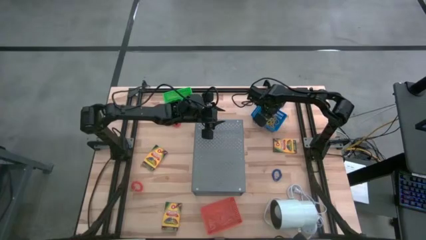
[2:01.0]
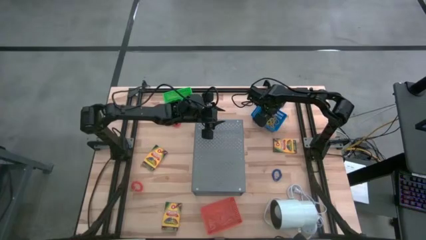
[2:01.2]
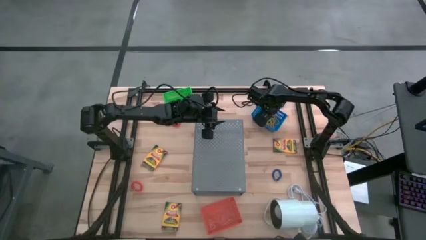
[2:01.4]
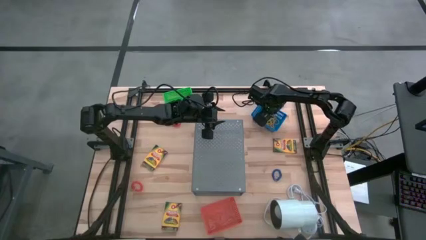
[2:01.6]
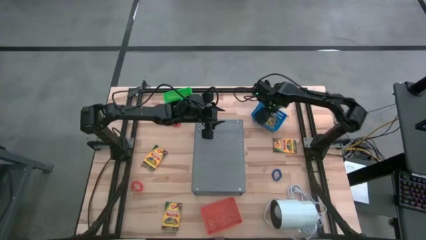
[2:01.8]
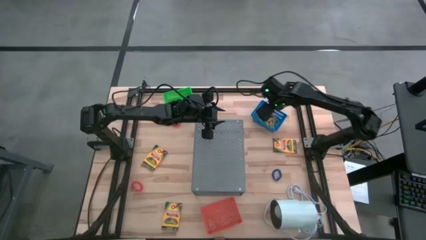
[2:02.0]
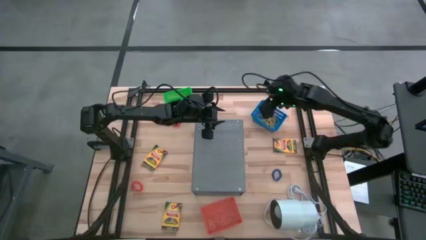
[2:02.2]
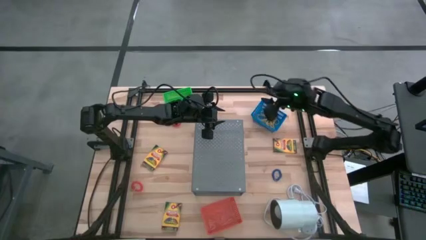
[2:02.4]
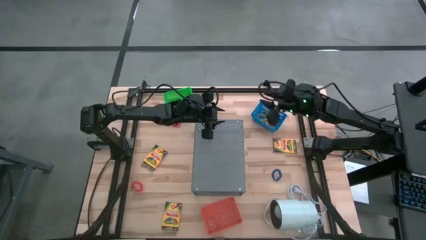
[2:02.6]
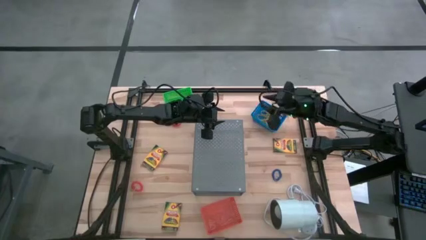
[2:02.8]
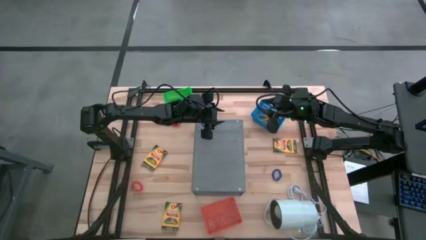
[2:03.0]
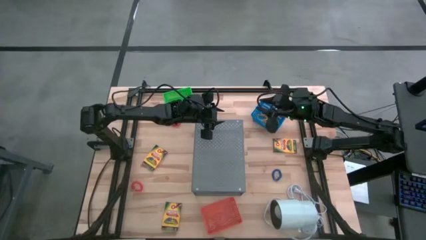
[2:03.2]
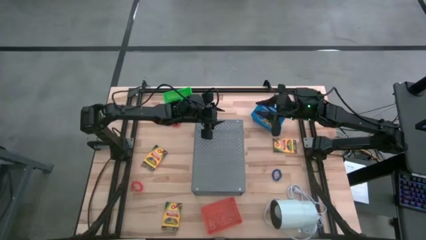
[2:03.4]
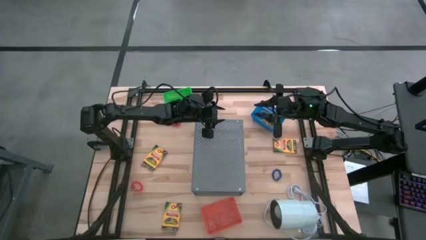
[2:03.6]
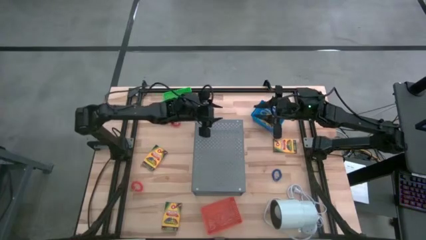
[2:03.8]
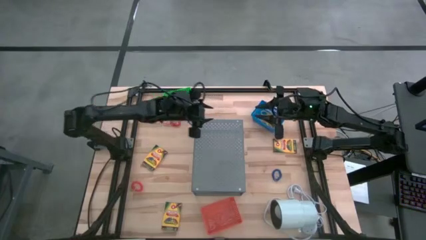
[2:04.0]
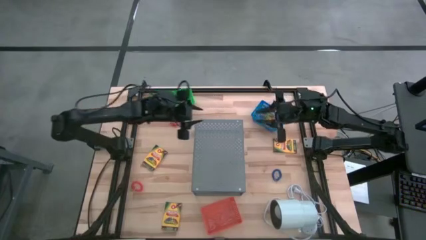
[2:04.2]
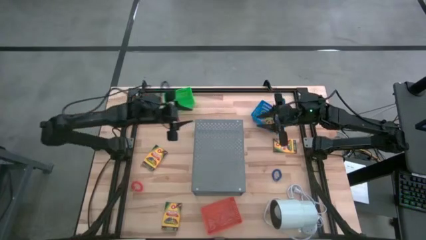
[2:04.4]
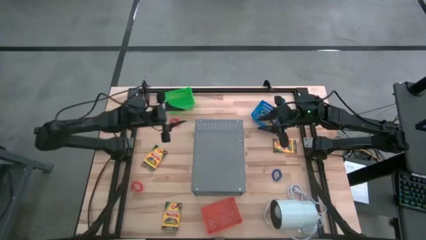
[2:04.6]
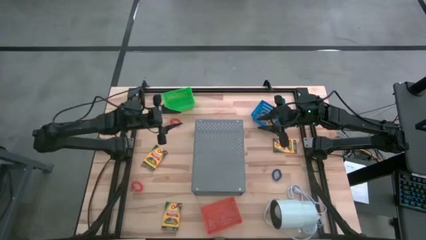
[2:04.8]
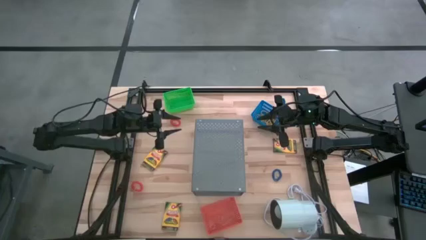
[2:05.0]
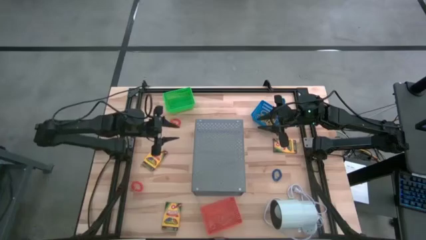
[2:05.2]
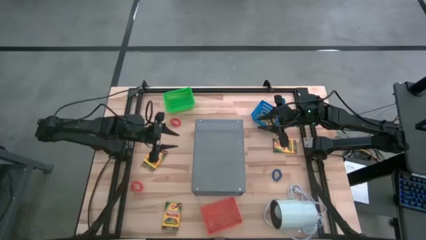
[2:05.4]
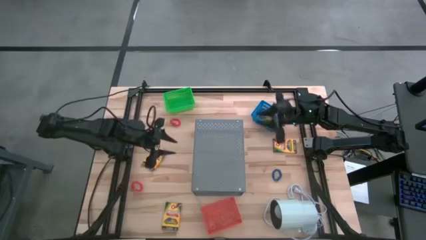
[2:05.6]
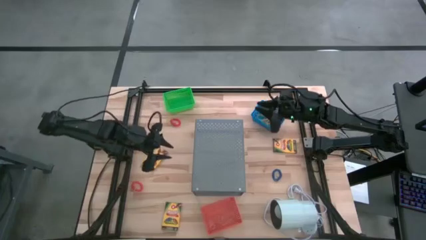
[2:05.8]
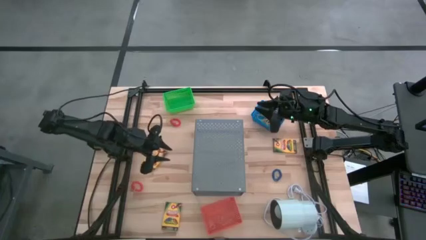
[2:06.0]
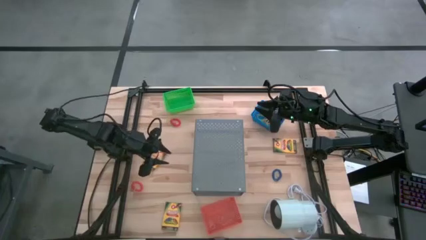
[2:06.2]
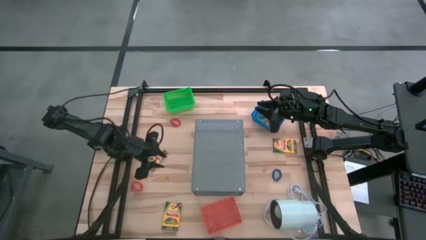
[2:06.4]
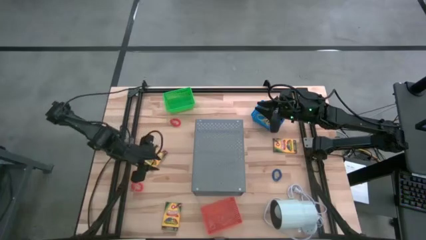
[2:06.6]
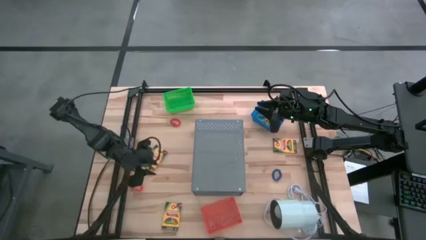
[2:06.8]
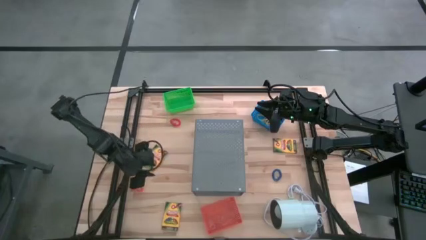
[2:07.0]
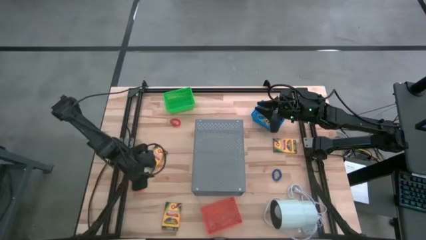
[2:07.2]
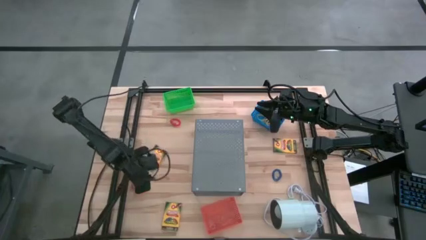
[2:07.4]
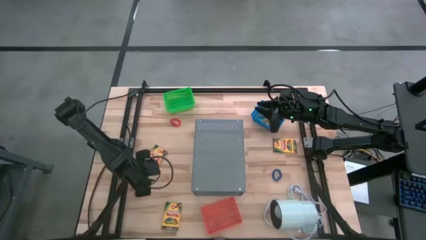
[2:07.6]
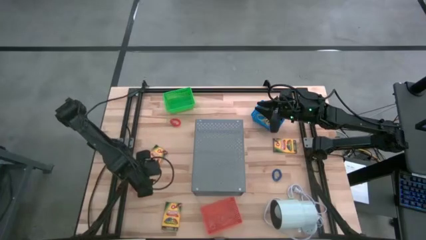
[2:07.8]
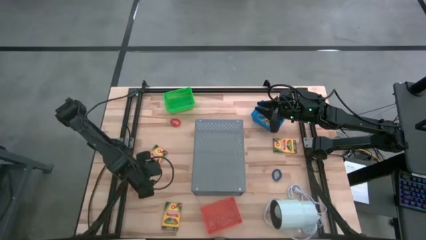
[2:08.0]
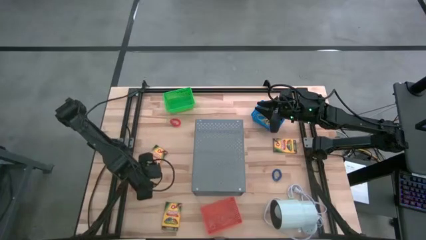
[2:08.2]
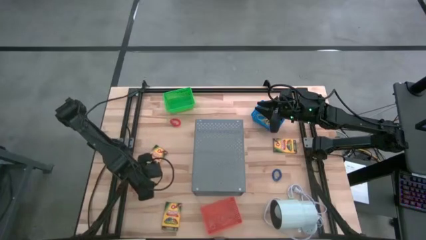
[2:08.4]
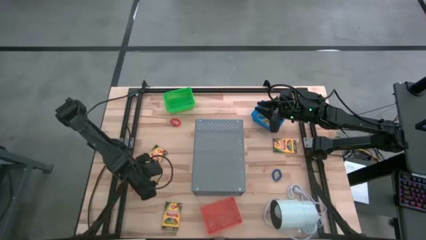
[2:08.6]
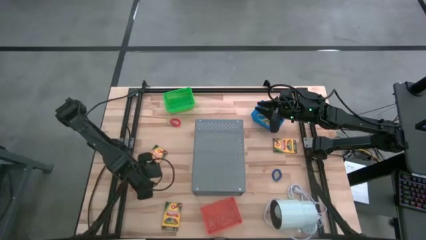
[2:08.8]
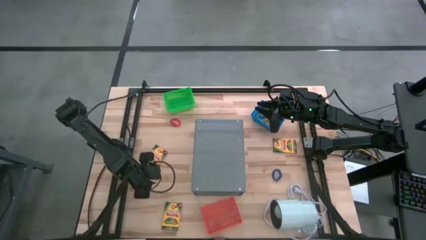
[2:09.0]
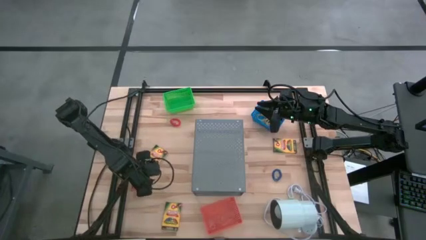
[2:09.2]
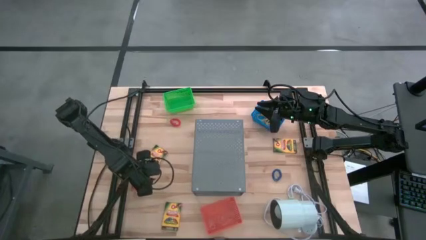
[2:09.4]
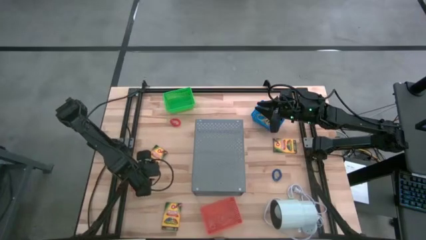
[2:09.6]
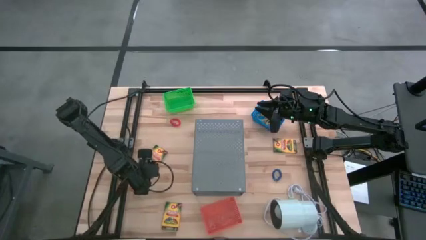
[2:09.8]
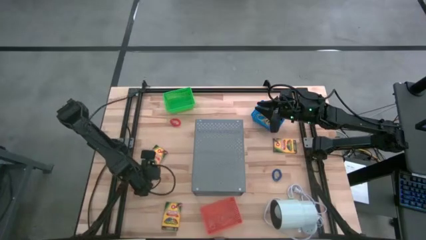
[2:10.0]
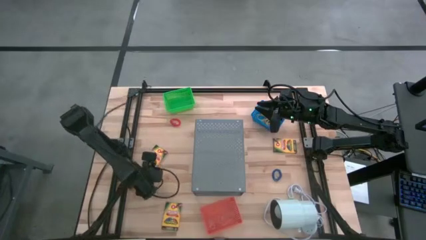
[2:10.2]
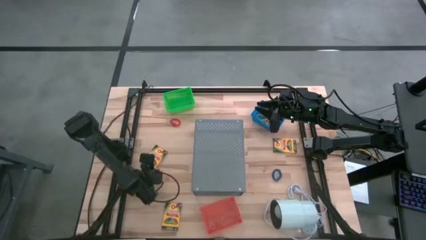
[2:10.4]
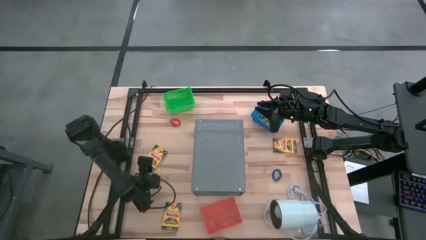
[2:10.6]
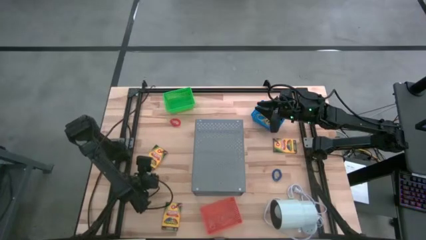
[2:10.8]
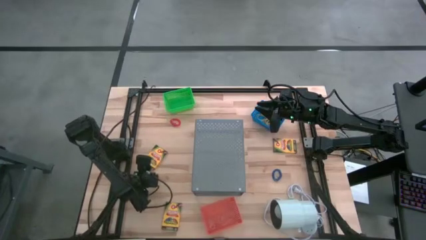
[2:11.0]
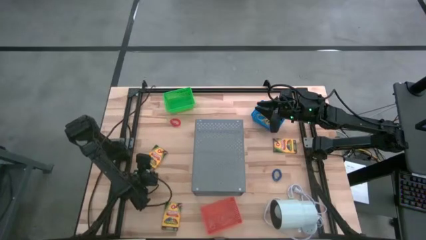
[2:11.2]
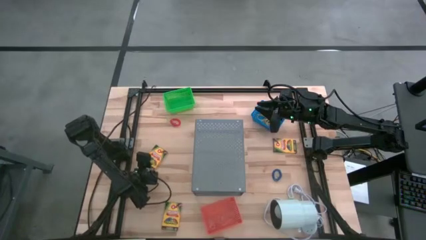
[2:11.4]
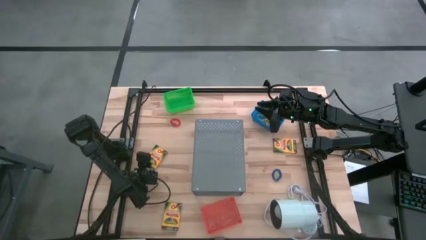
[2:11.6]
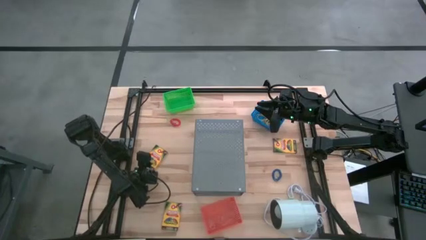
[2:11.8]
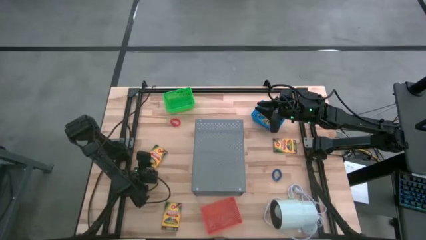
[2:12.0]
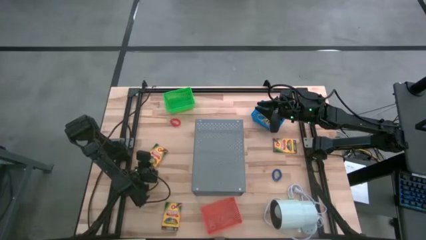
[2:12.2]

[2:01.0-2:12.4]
Task: Pick & Place Office Desk Supplies
Put the top left yellow crayon box into the green basket

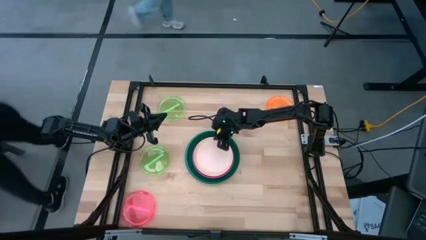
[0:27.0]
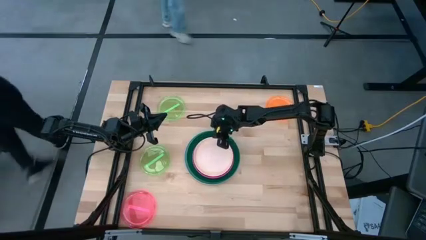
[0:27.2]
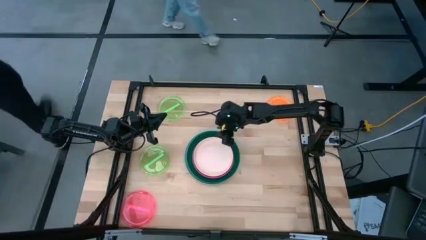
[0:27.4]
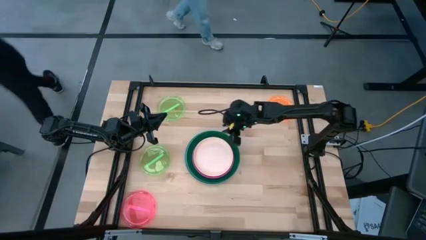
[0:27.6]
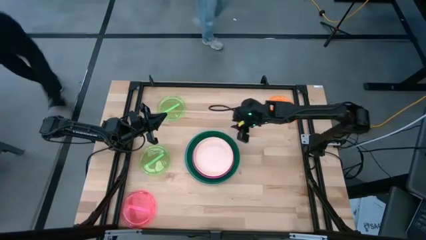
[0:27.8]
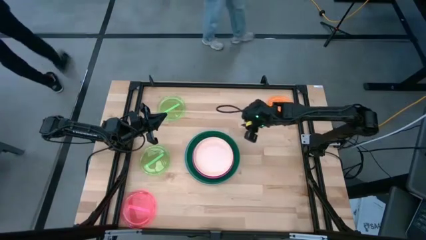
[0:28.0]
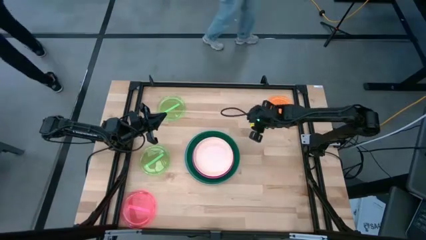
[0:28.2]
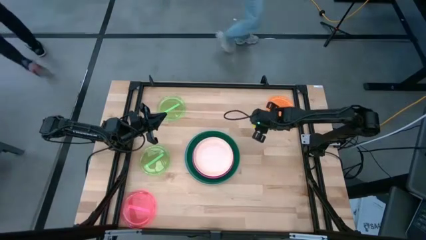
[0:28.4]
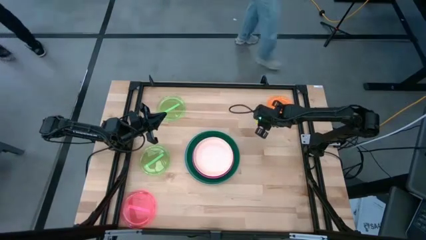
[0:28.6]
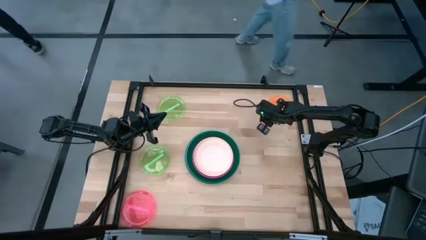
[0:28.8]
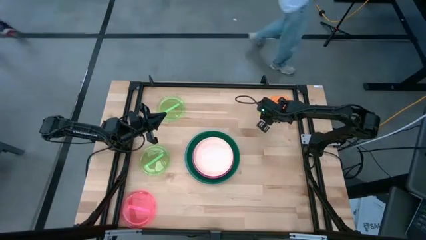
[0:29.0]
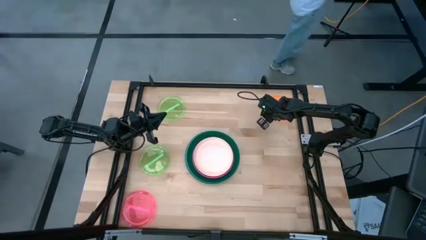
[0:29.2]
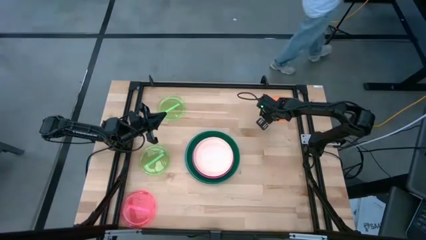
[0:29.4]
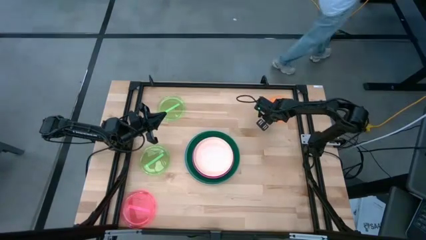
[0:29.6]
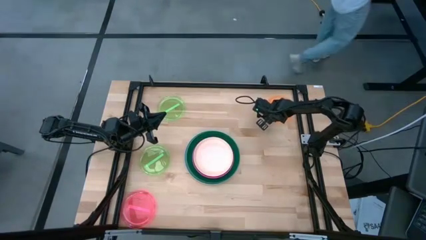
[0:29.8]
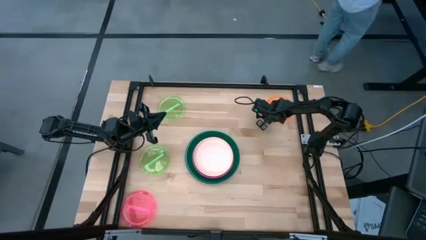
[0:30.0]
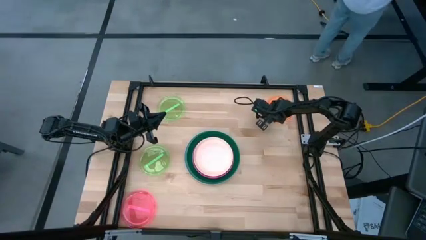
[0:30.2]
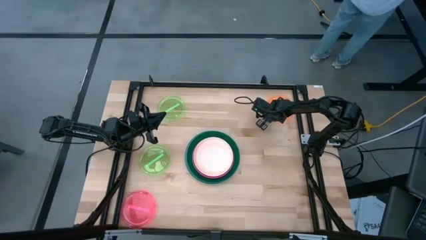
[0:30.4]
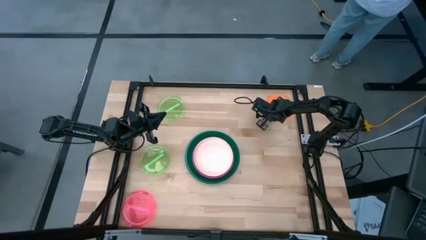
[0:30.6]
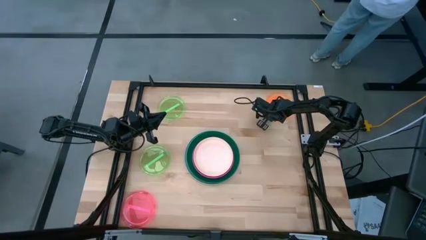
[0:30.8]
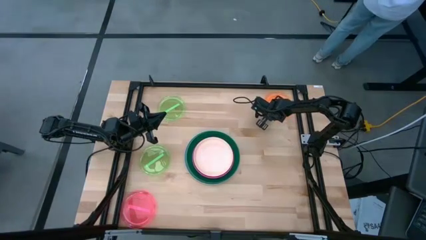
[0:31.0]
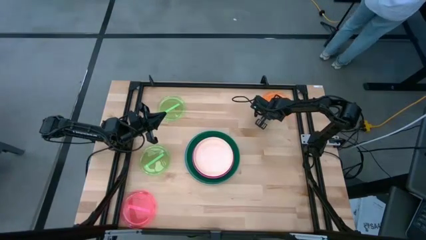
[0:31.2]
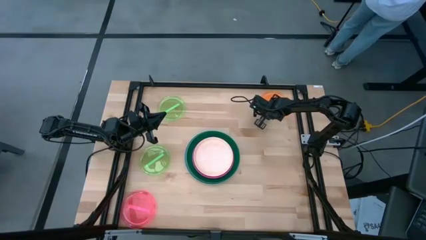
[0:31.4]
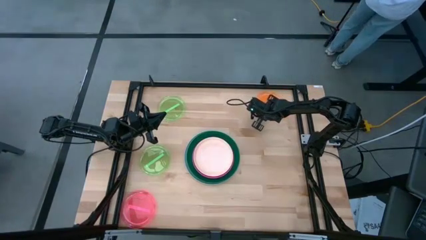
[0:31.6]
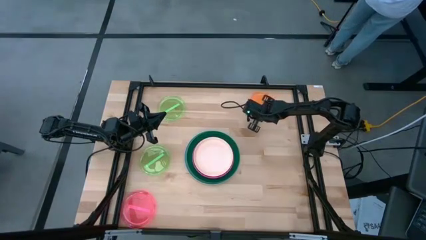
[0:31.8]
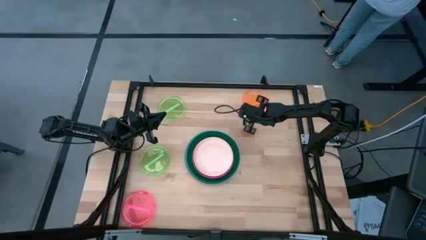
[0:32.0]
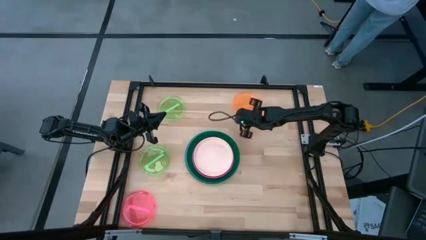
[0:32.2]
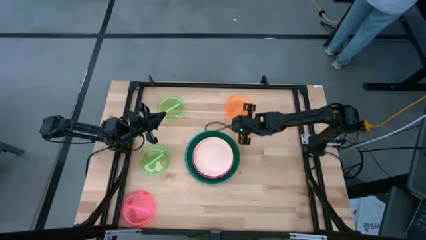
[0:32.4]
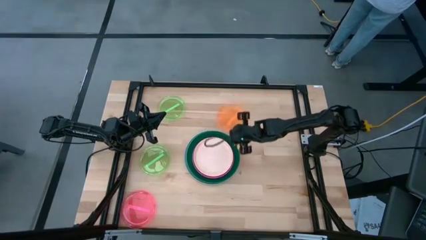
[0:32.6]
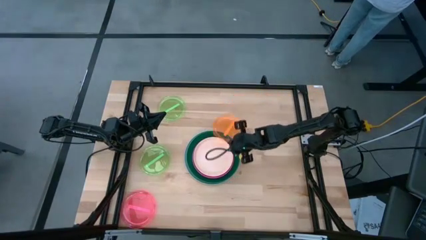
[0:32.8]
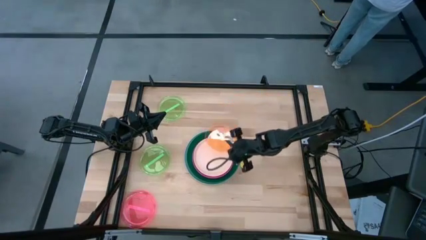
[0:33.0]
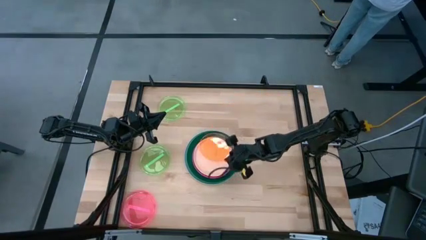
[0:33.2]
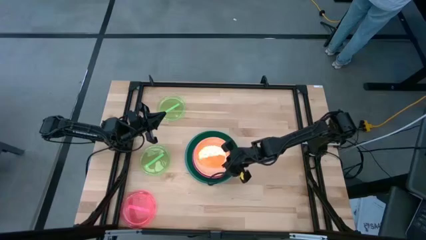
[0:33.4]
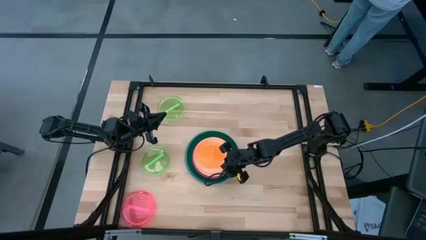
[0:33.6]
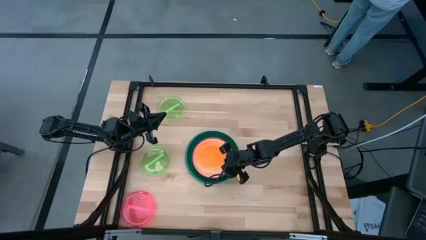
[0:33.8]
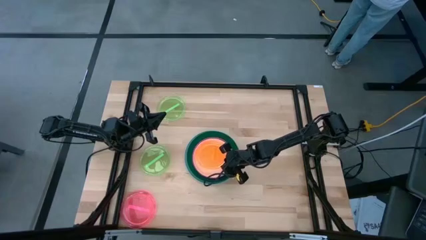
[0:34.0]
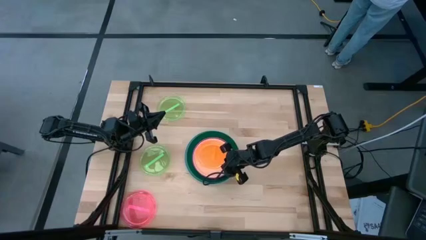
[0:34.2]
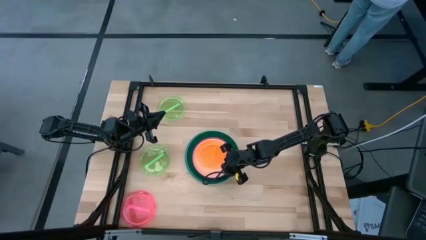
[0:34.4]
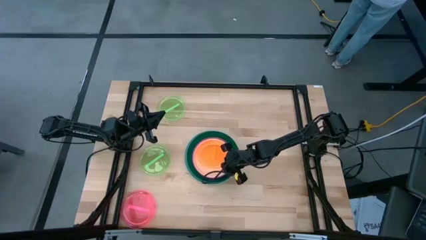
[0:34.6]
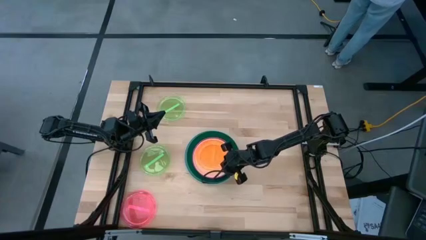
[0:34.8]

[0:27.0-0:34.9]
Task: Stack plastic plates
Stack the orange plate on top of the light orange plate
